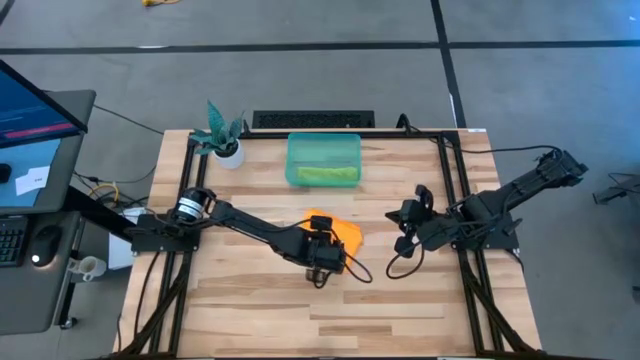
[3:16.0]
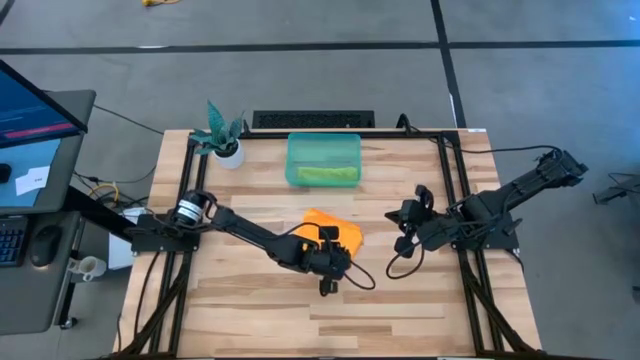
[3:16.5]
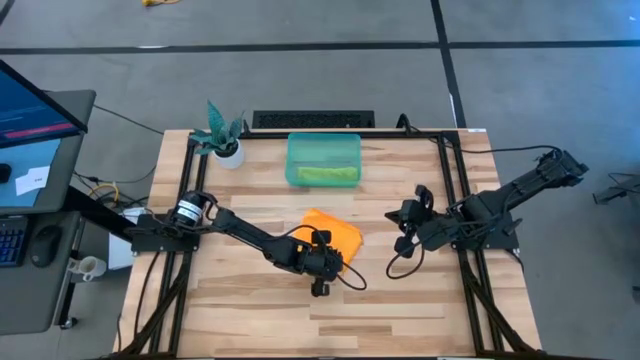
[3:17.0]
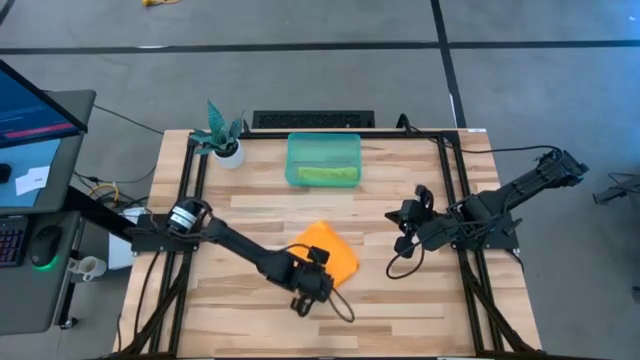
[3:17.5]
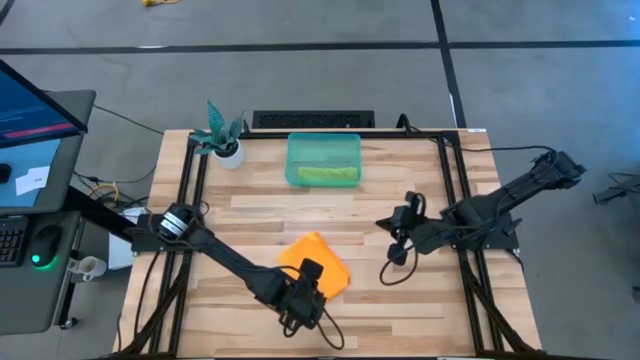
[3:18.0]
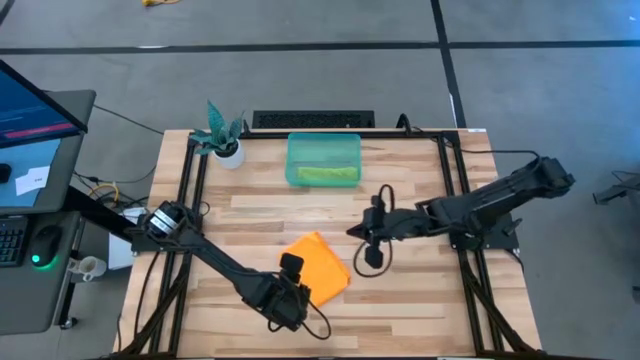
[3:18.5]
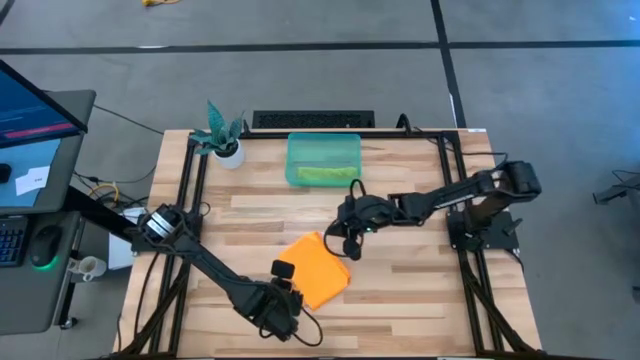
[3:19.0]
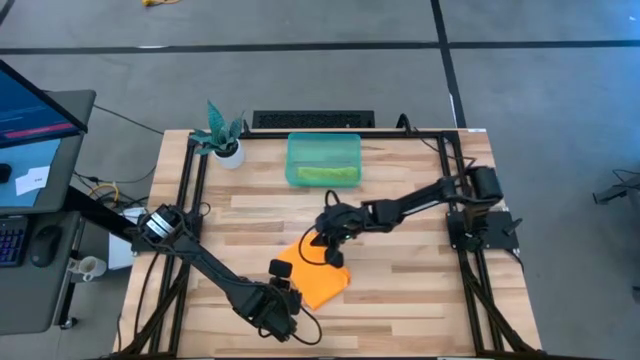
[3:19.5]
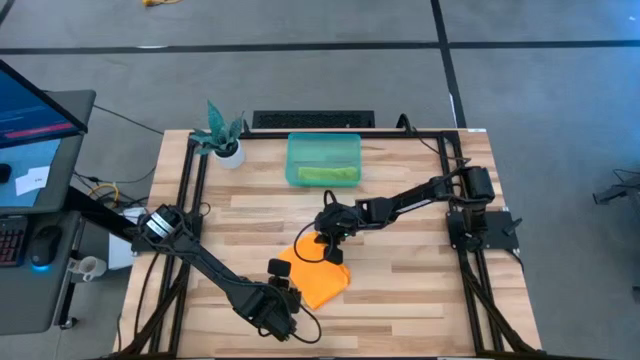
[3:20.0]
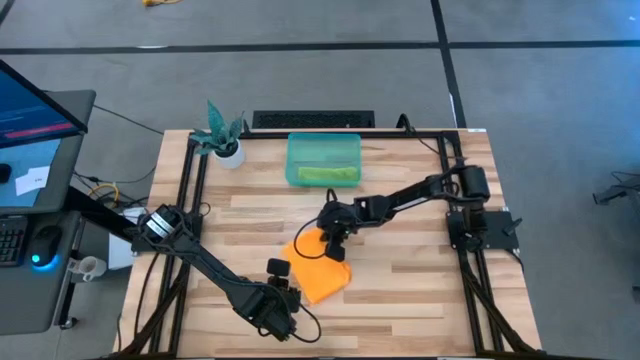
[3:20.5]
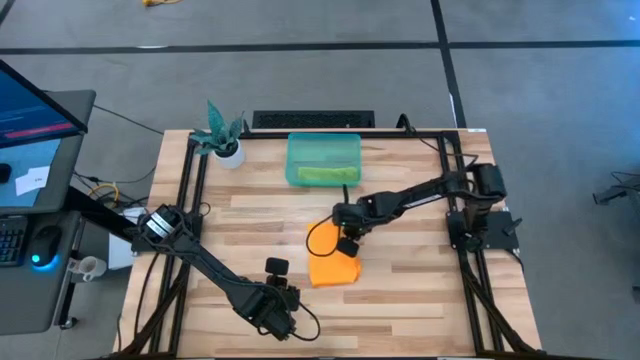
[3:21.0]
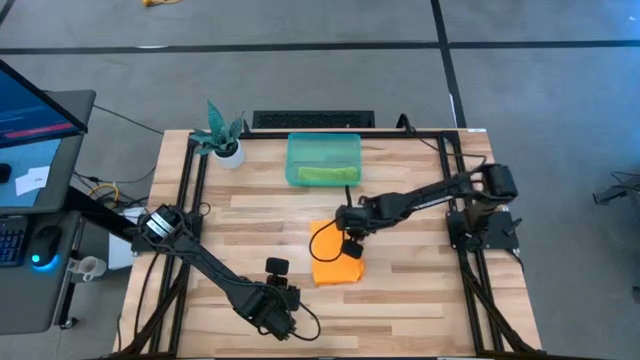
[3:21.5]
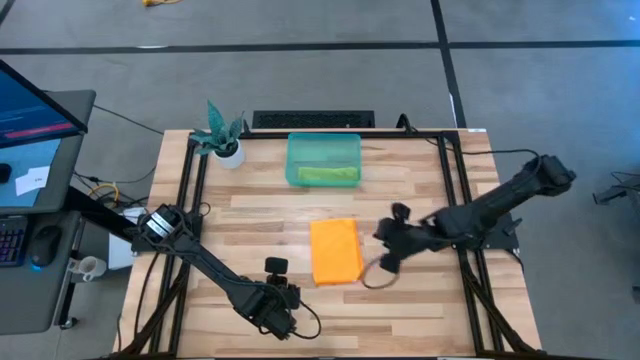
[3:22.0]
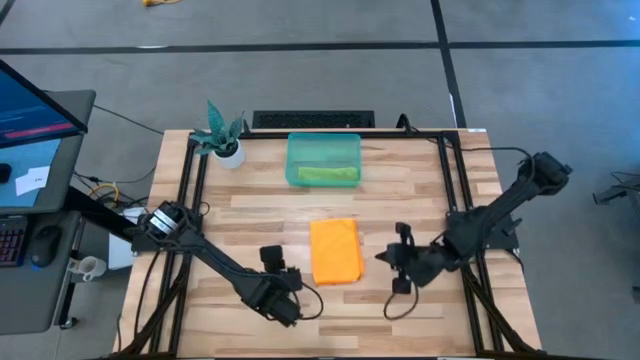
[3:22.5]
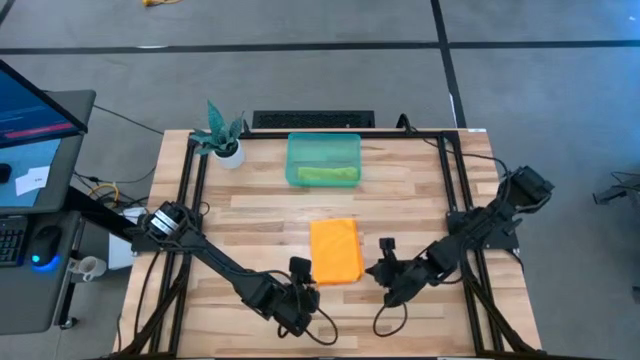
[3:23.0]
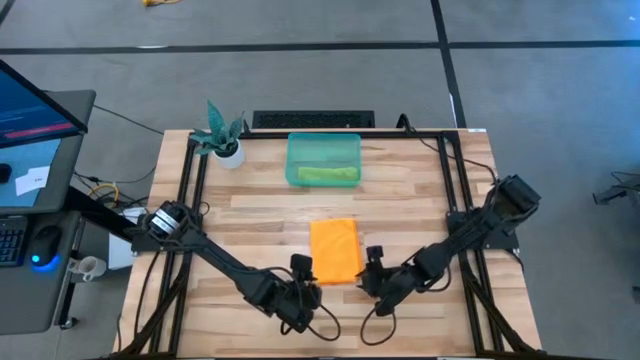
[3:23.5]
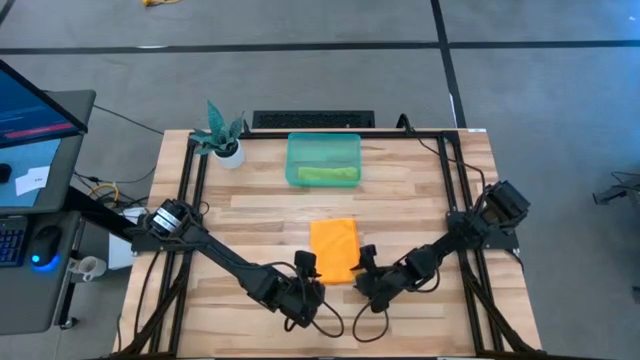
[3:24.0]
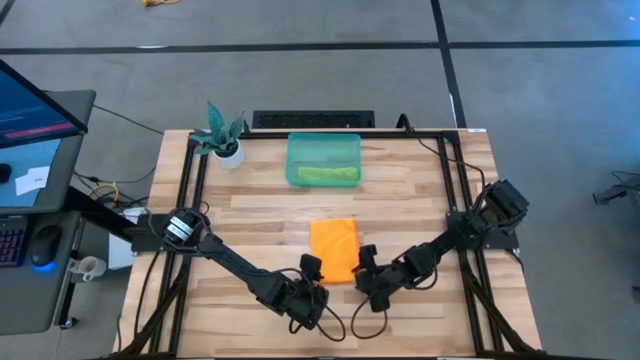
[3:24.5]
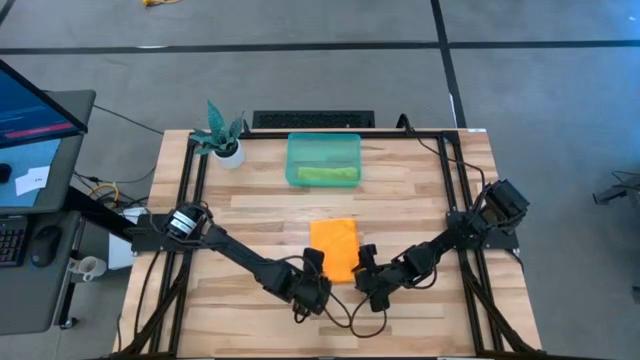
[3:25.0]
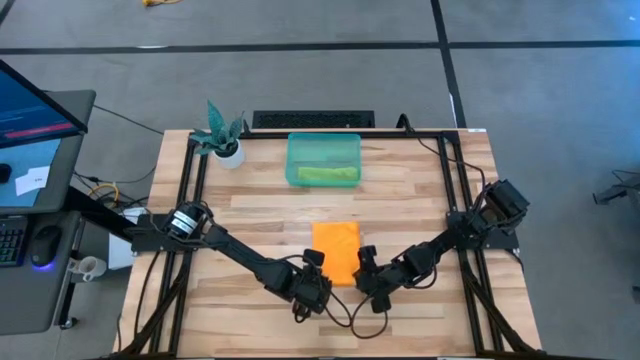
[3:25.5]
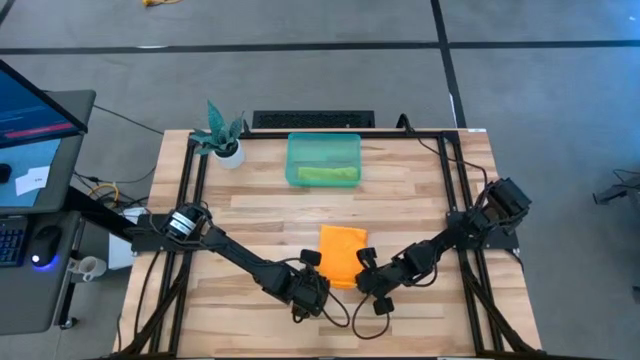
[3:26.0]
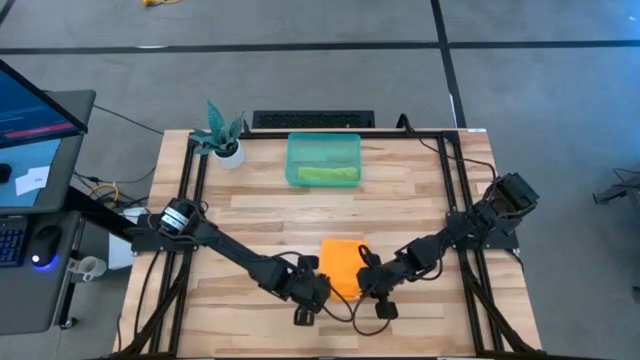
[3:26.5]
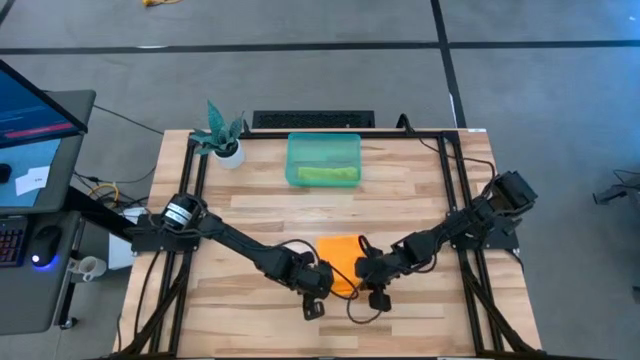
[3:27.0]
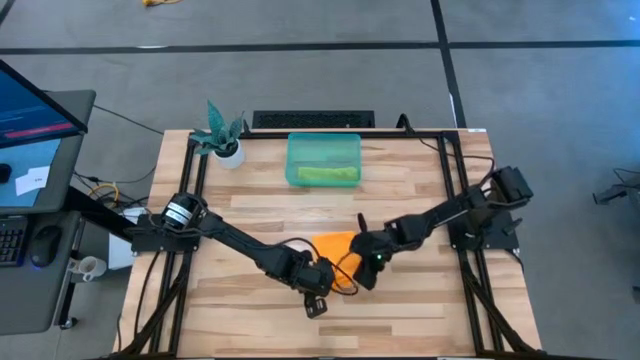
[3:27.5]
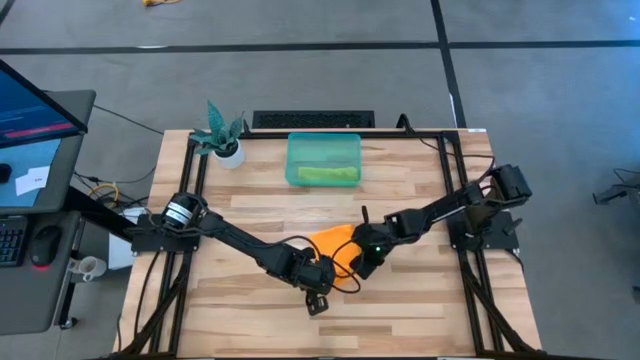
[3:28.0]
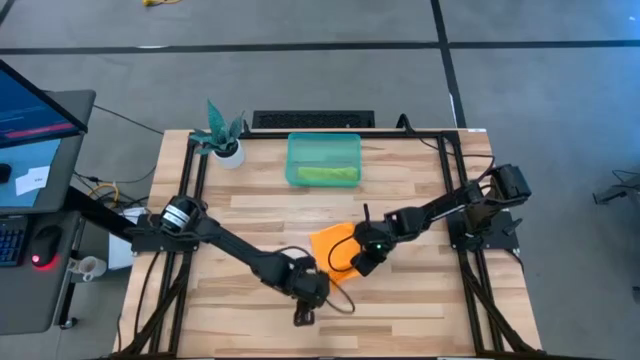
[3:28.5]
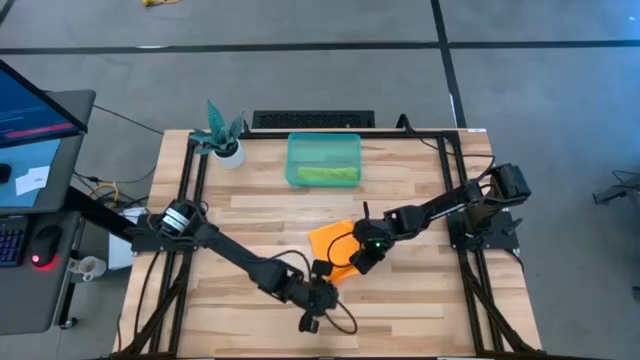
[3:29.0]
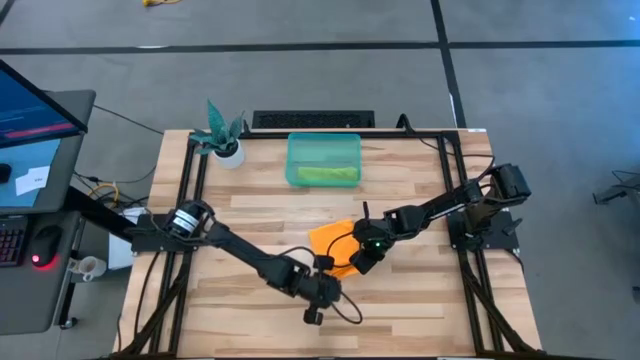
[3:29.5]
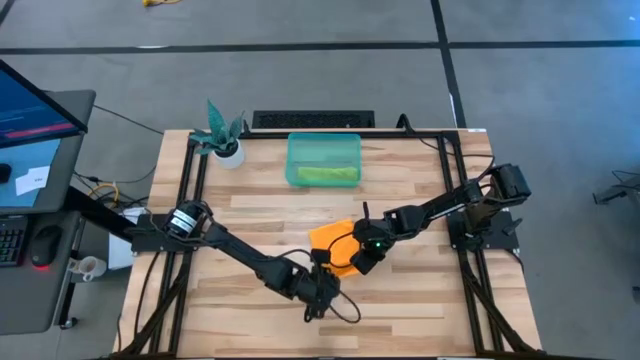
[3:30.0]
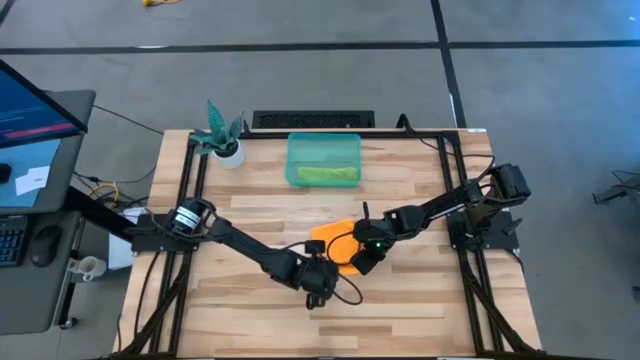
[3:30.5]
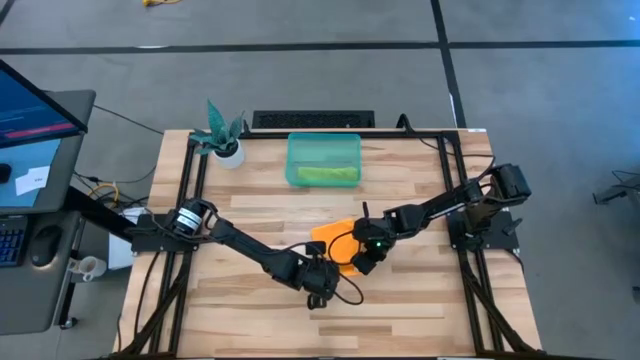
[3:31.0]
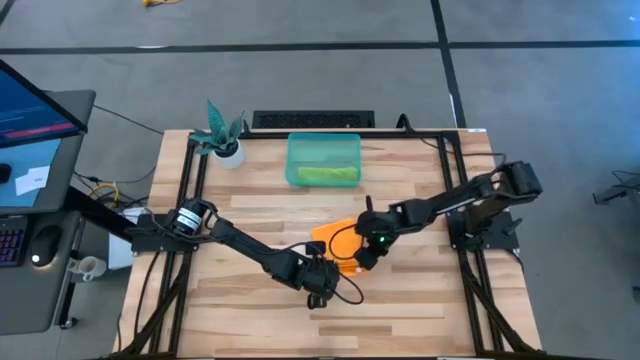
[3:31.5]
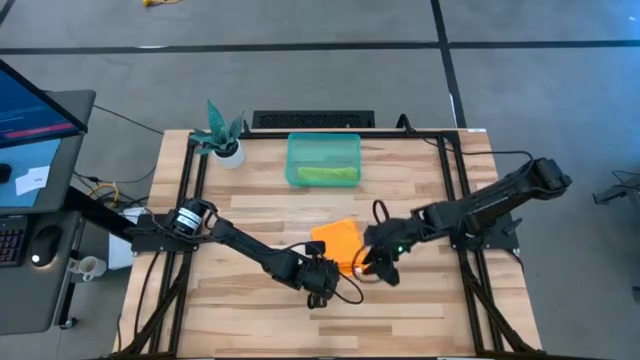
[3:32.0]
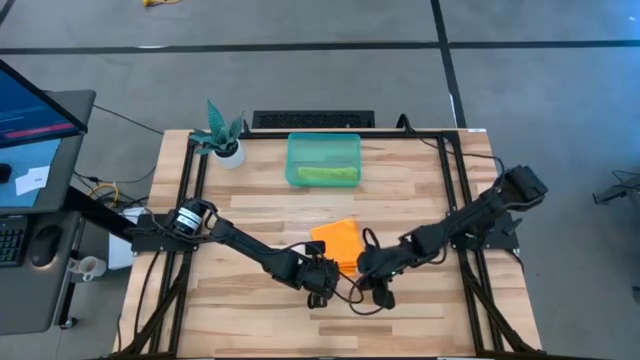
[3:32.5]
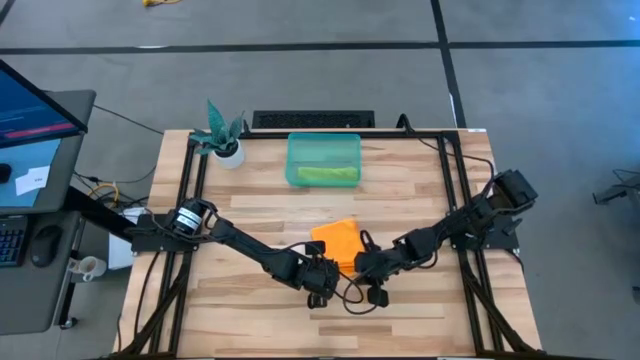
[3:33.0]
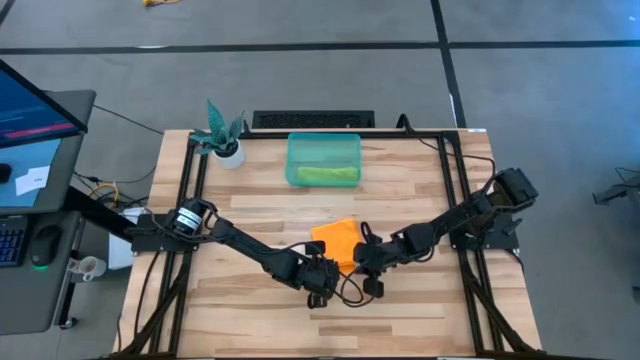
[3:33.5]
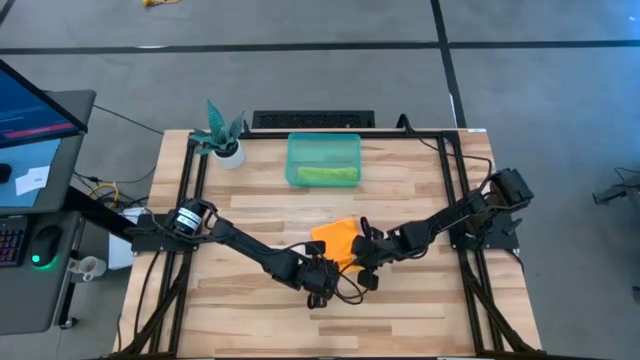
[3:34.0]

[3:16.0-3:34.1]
Task: Roll microfiber towels into tight, uniform cylinder then place into a basket
Roll the orange towel
